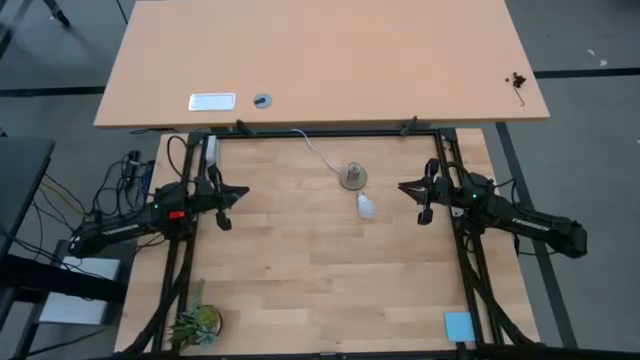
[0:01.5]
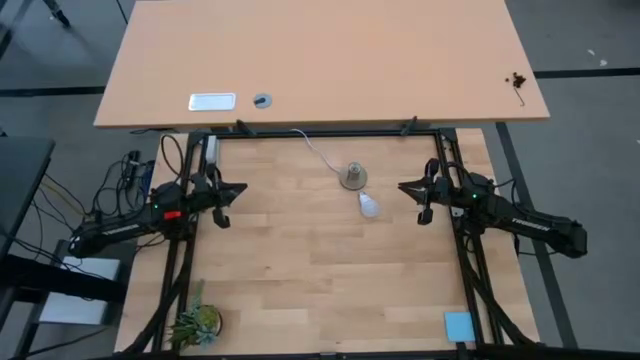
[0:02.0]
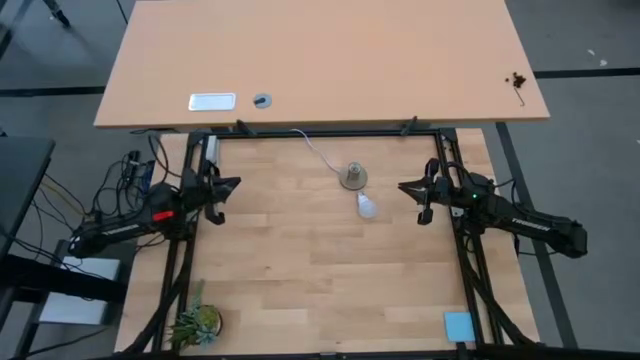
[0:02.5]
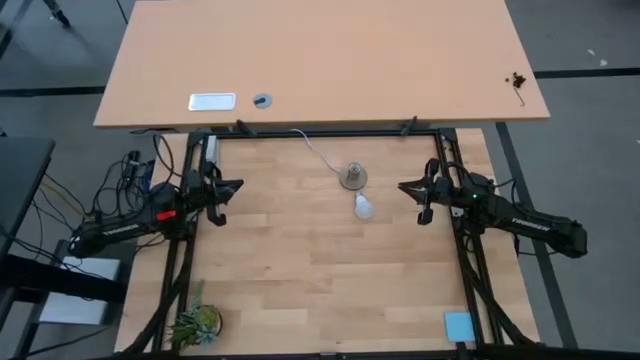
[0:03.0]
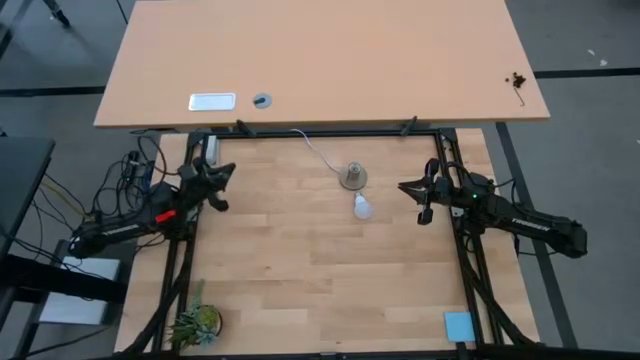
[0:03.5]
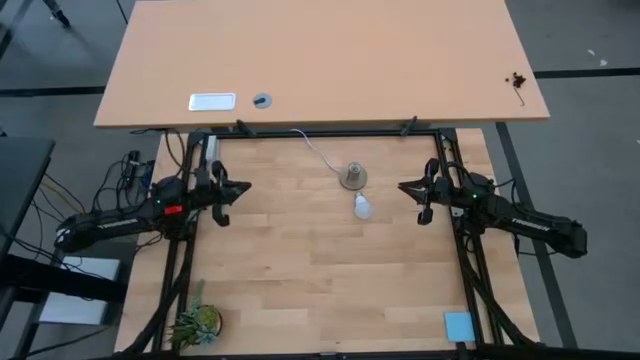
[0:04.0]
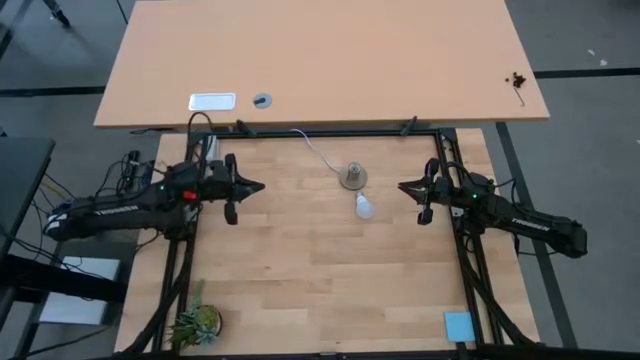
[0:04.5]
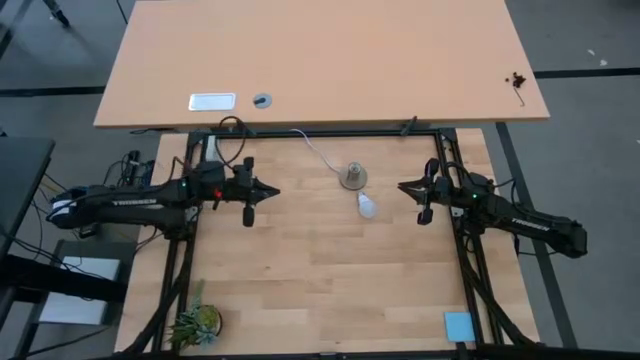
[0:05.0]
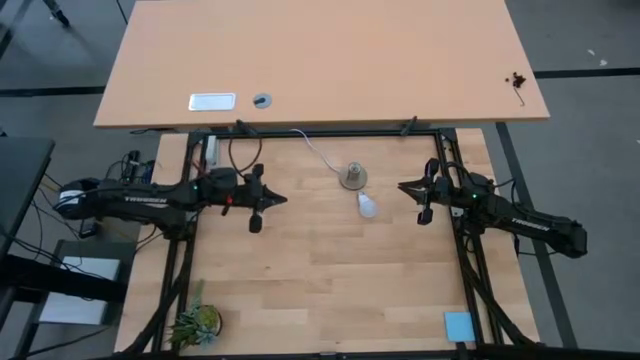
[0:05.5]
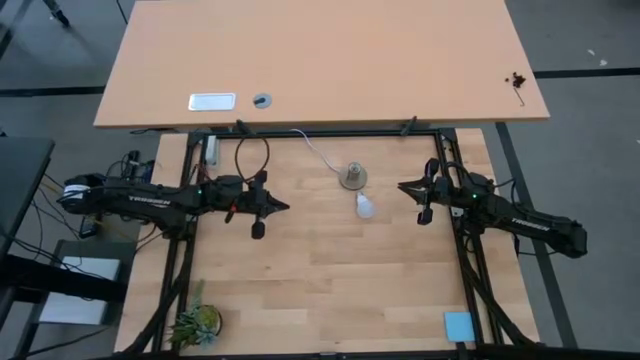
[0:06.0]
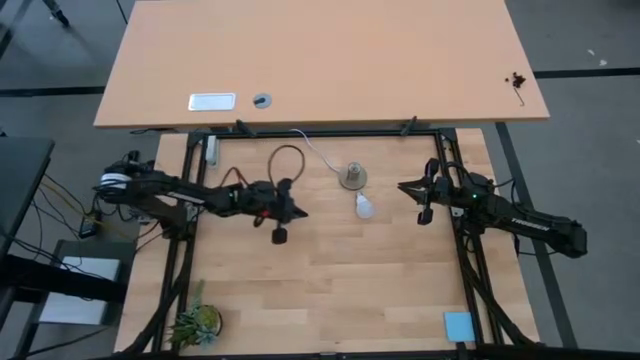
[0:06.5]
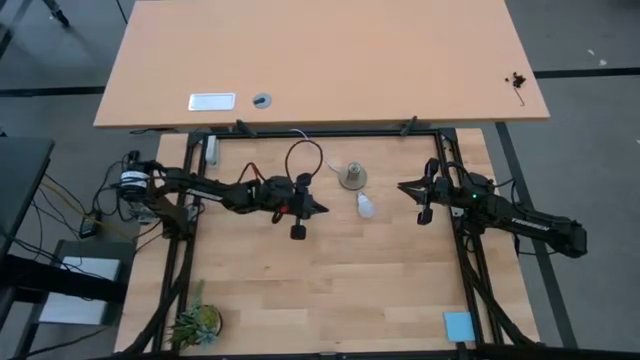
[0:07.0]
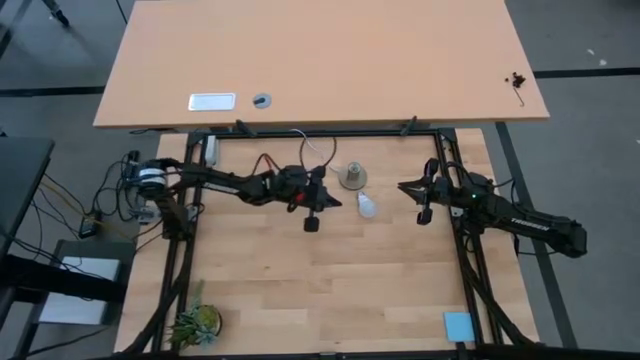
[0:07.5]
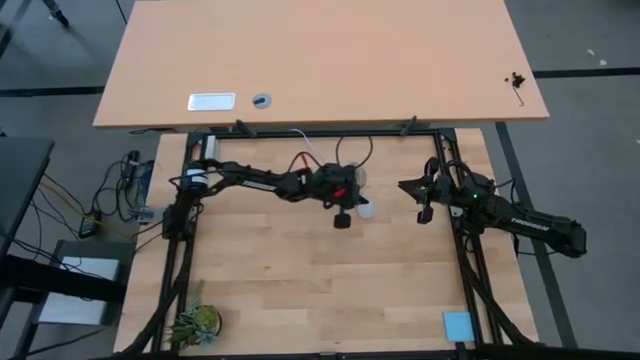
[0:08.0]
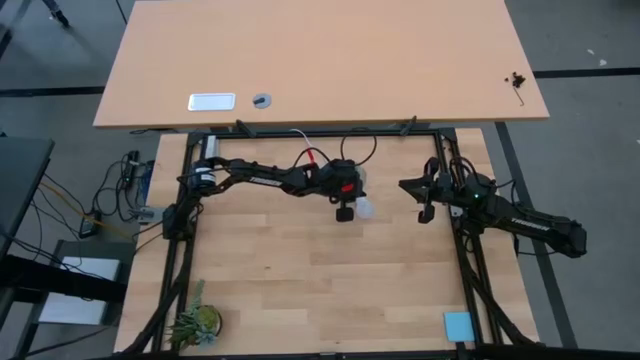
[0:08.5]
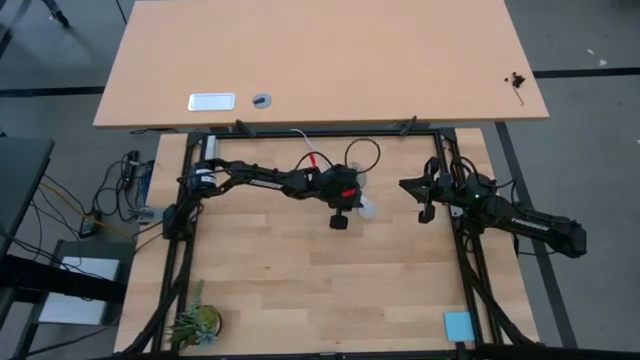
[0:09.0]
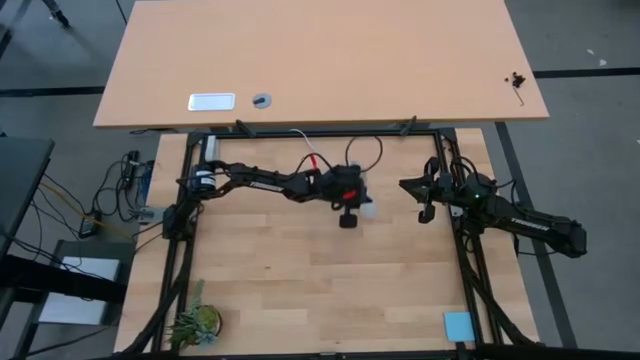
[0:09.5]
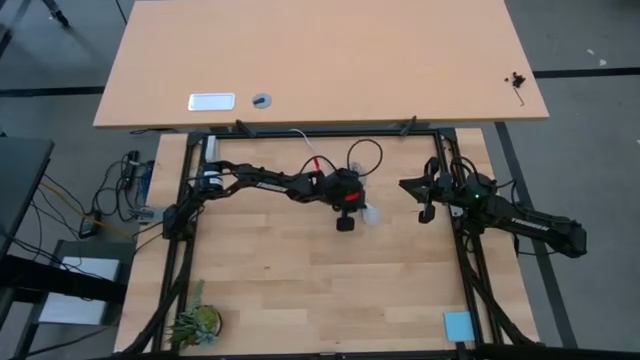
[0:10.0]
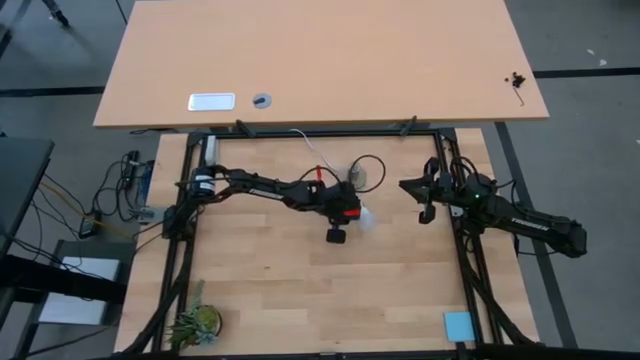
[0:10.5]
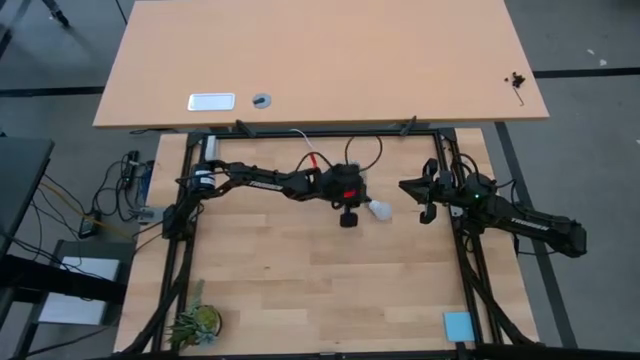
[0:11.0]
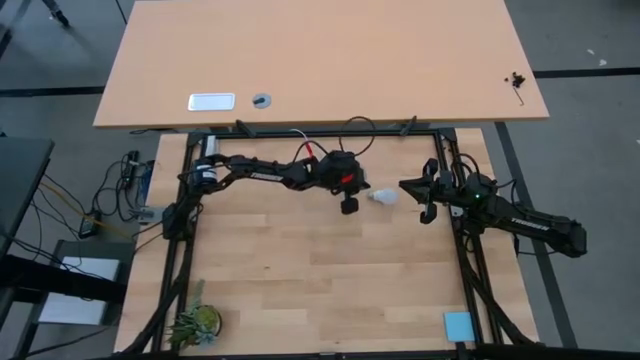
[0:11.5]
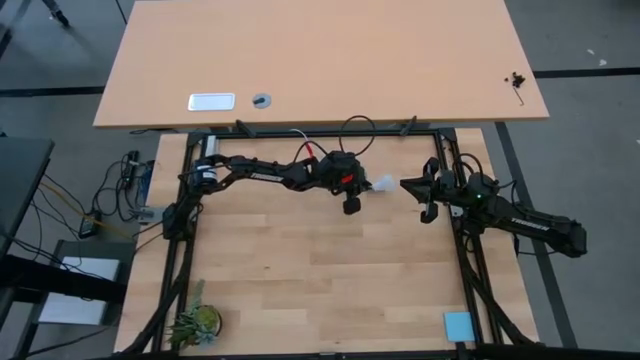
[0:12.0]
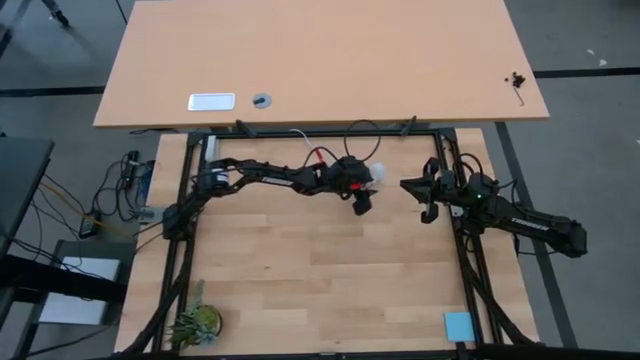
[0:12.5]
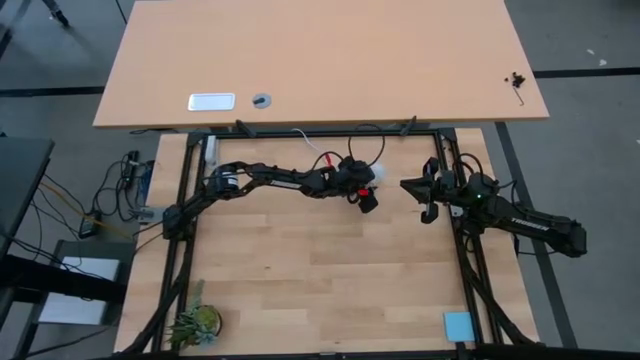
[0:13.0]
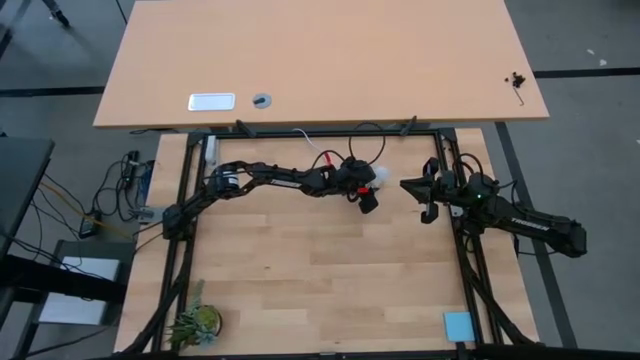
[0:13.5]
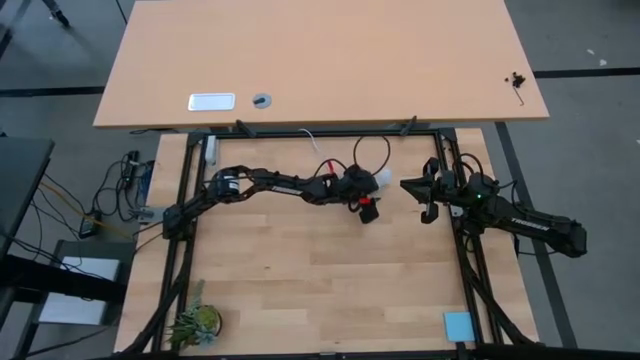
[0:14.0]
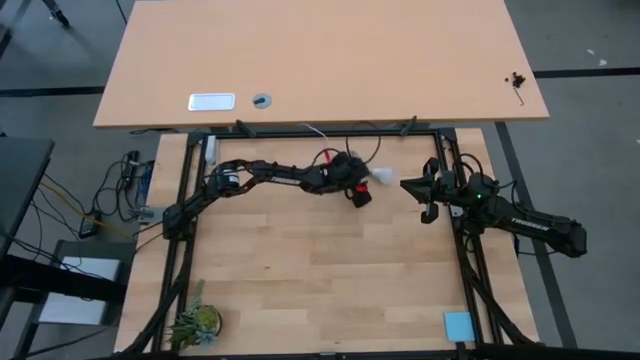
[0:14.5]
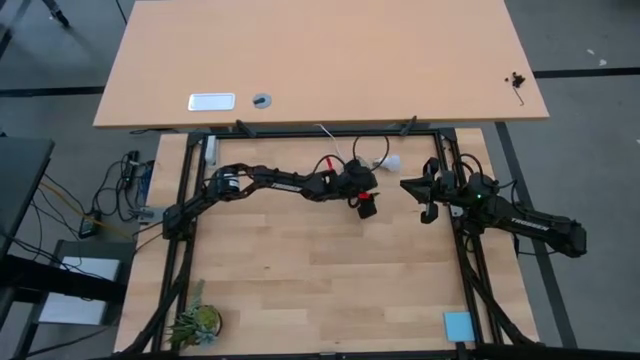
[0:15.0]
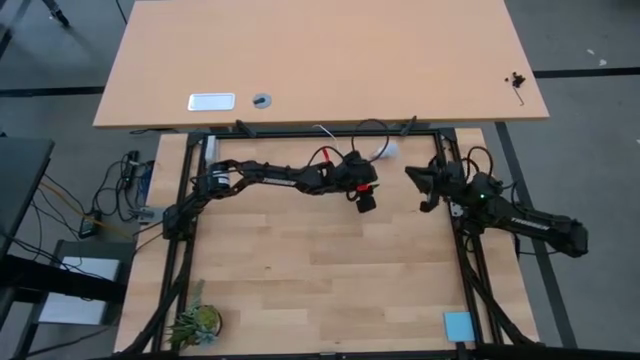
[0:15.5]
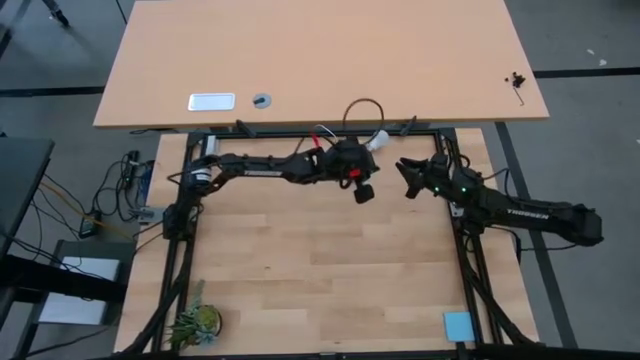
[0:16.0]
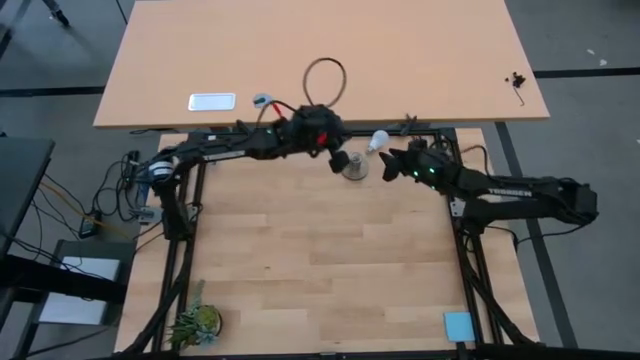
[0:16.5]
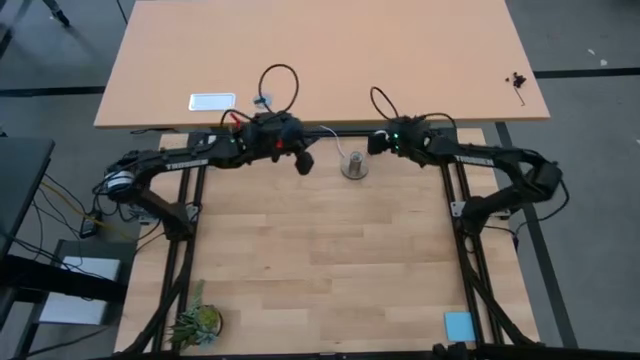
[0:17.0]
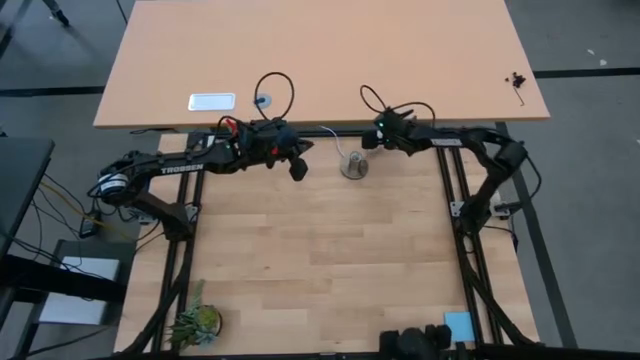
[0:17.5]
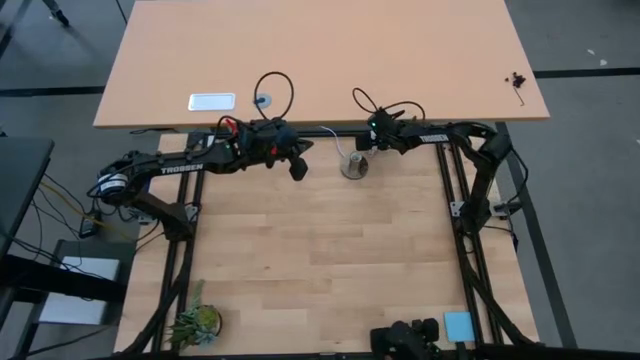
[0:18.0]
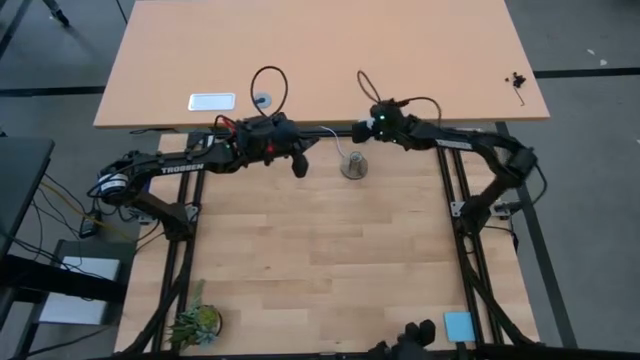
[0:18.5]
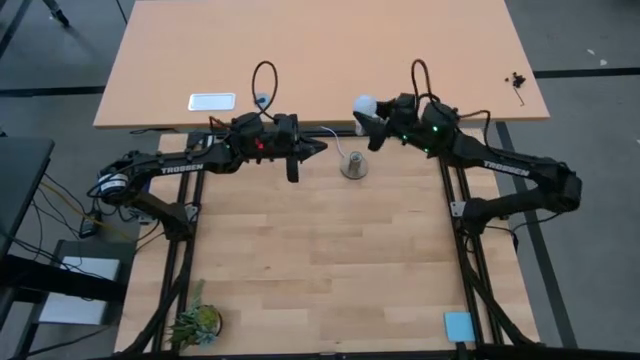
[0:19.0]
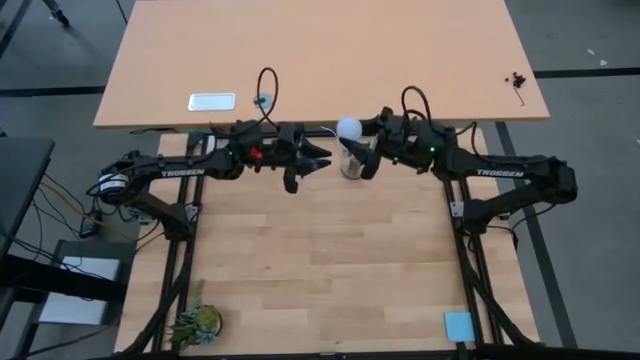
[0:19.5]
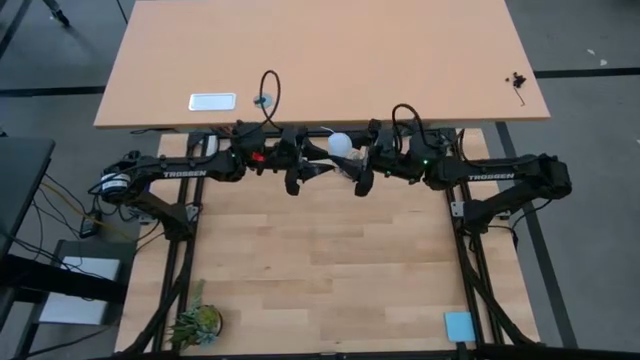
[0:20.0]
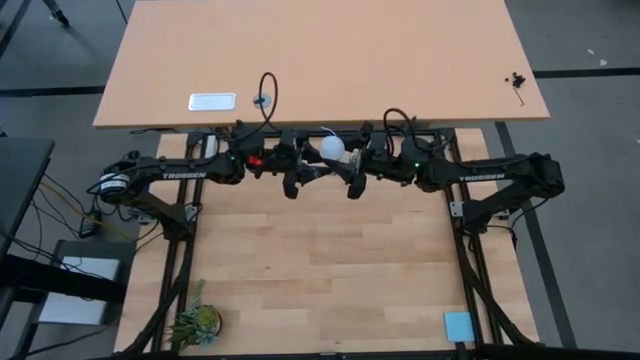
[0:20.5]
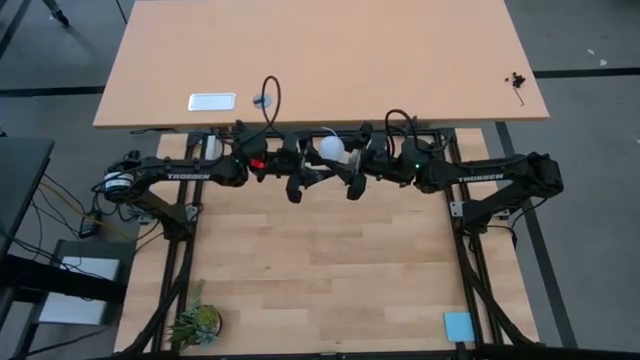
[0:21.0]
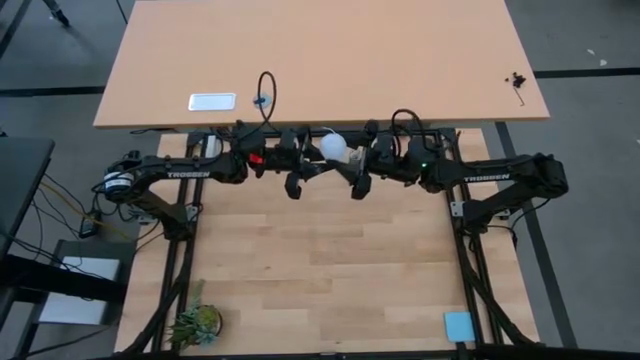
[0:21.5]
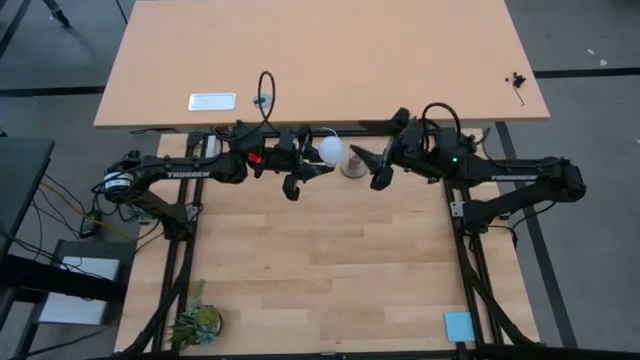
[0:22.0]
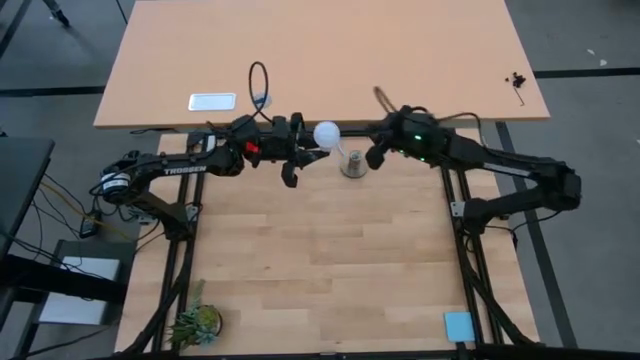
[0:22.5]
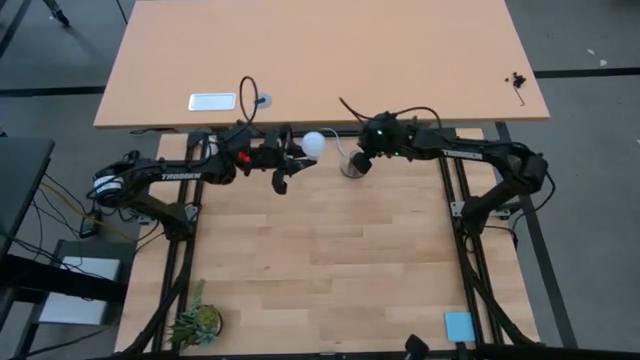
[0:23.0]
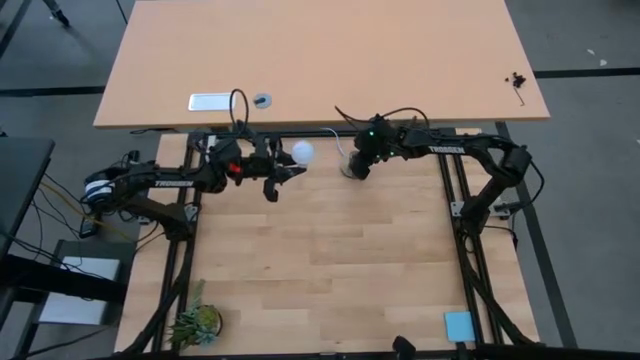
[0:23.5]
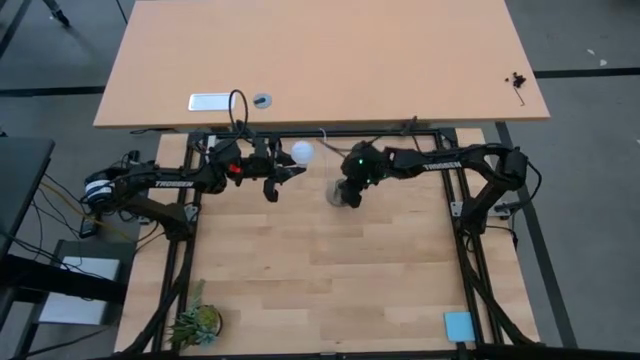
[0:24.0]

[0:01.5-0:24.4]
Task: Screw lightbulb
Insert the white lightbulb into the gold lamp
